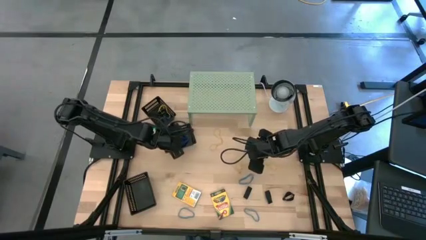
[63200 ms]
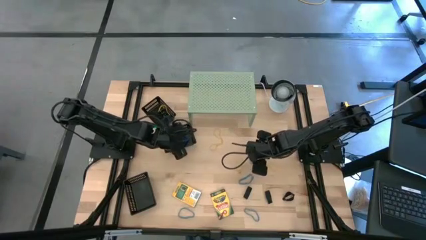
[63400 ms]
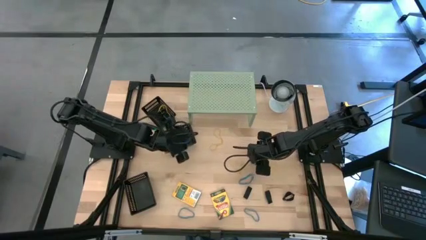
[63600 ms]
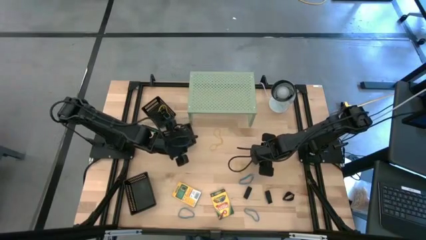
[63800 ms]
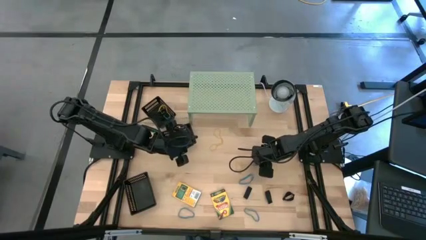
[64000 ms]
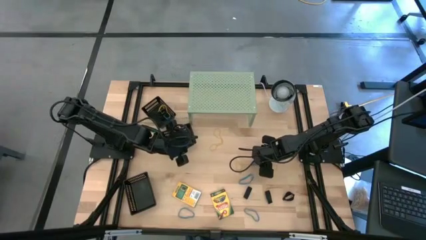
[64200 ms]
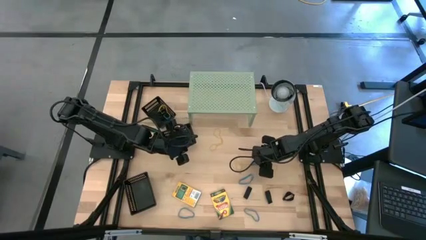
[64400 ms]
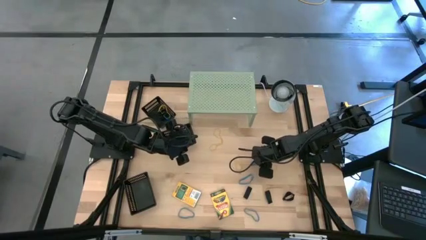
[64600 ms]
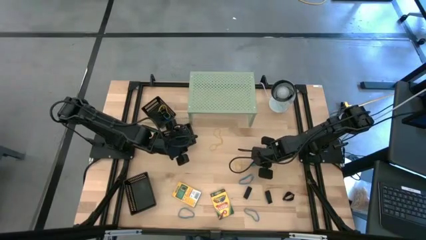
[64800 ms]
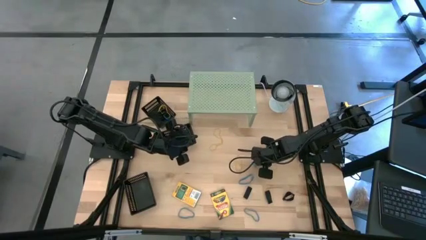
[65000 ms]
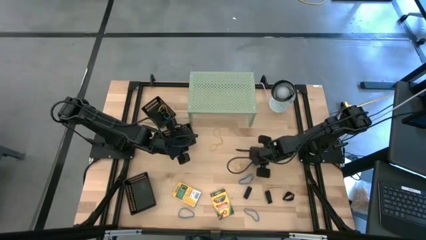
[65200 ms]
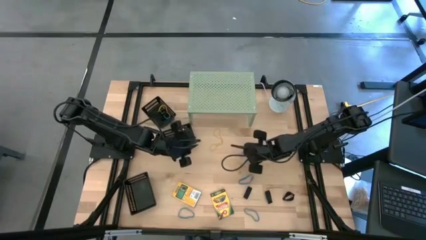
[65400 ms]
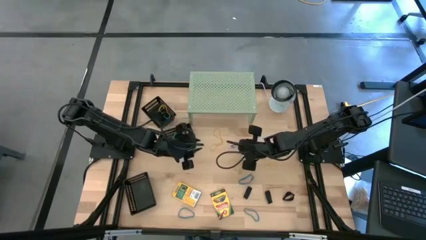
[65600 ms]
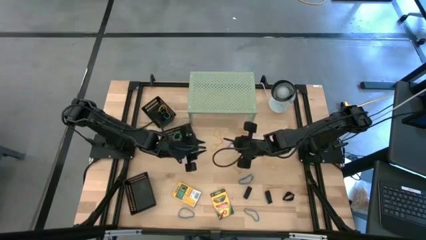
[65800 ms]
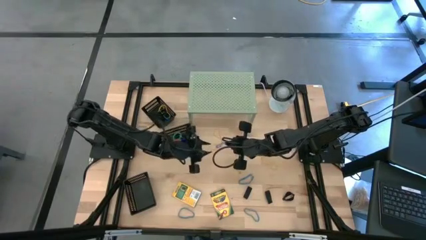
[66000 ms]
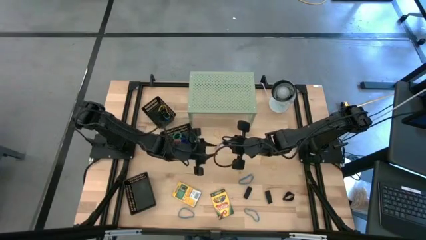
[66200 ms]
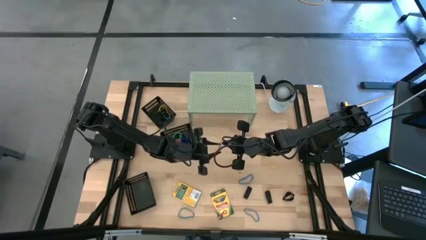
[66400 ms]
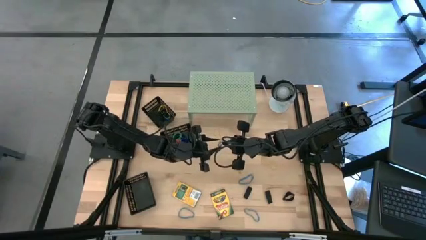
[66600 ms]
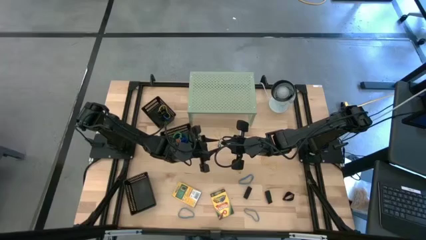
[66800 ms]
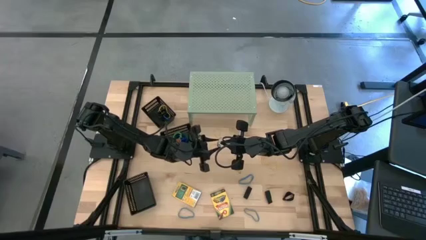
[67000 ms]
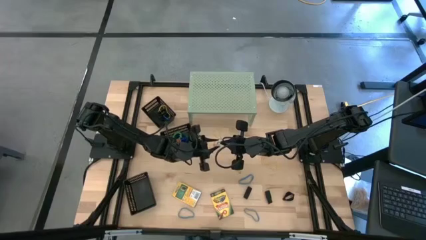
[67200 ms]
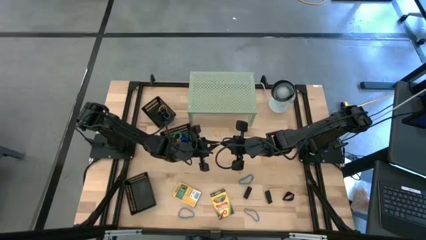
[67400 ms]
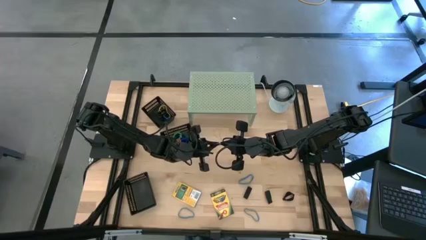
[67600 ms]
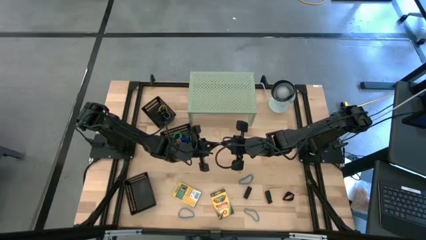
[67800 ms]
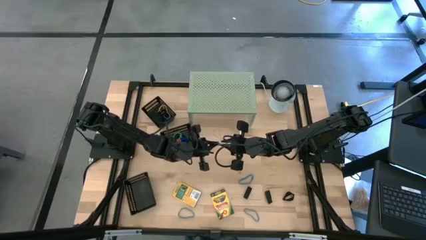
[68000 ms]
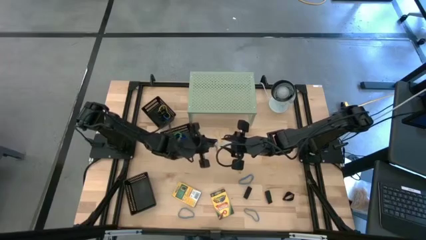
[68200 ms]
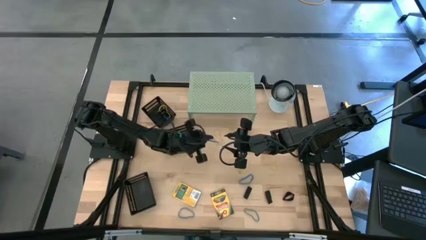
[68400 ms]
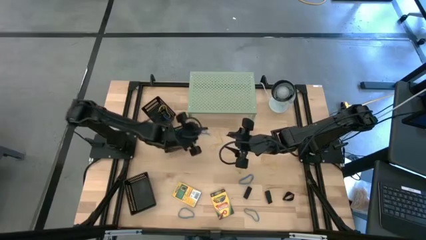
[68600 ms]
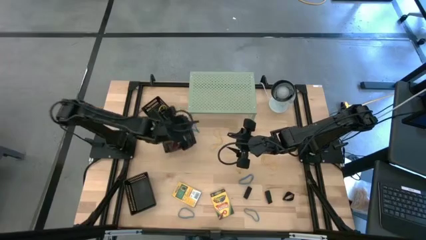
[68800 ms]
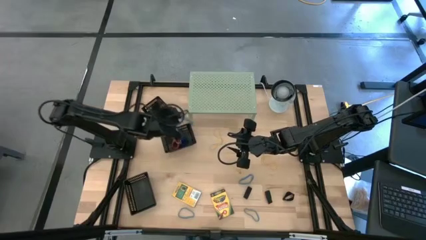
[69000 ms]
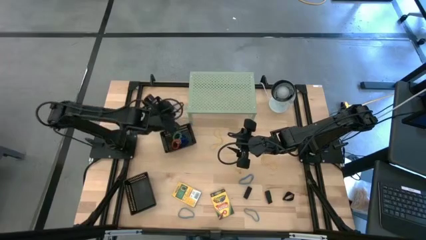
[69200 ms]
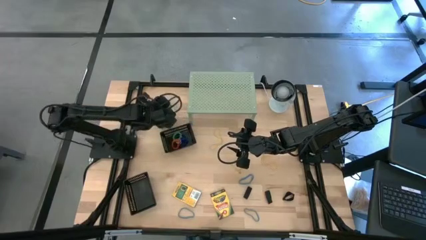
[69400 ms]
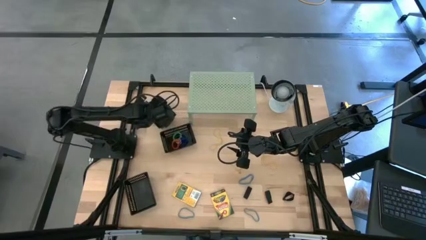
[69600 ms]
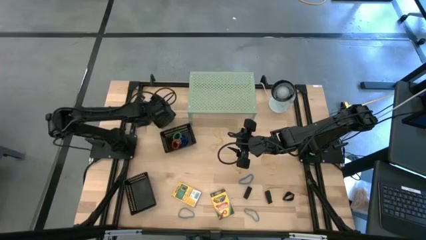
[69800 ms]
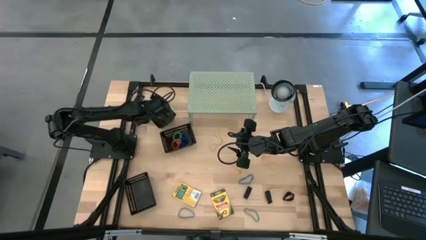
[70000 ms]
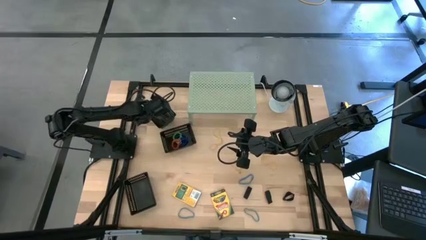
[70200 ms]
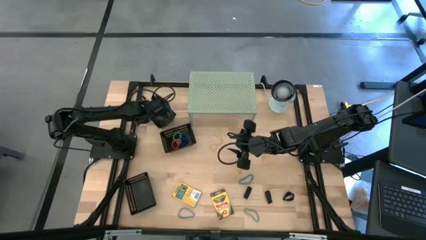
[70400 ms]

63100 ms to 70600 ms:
Task: Pick & Place Office Desk Supplies
Put the blue rubber band into the top black bin

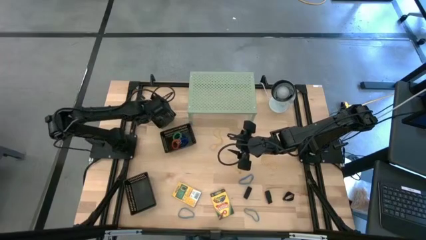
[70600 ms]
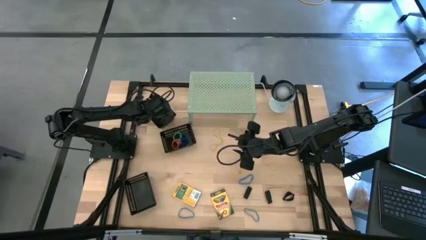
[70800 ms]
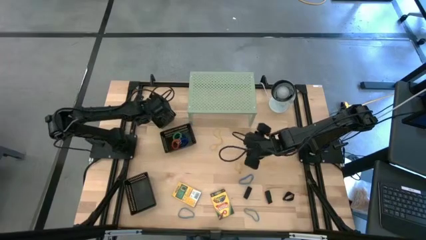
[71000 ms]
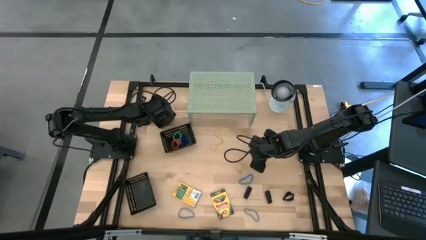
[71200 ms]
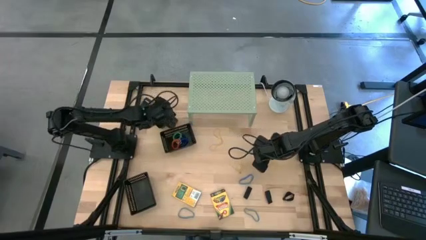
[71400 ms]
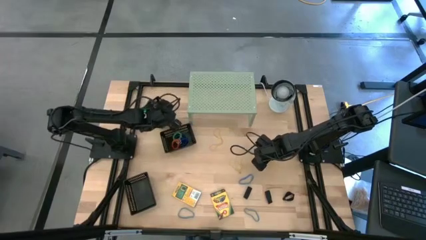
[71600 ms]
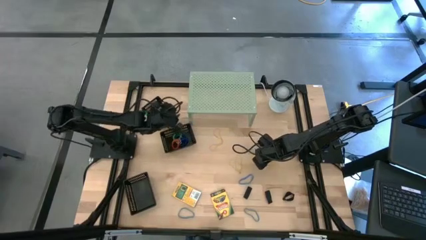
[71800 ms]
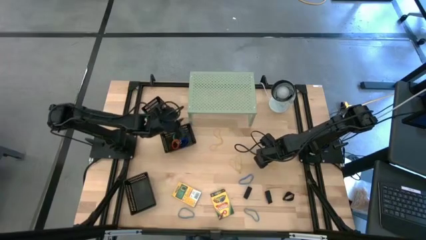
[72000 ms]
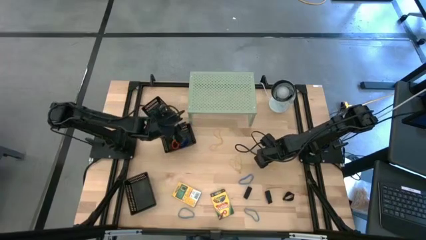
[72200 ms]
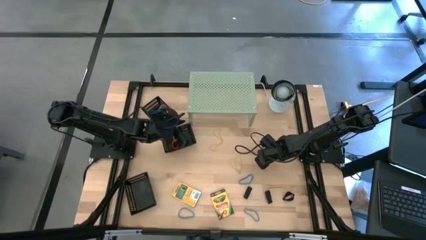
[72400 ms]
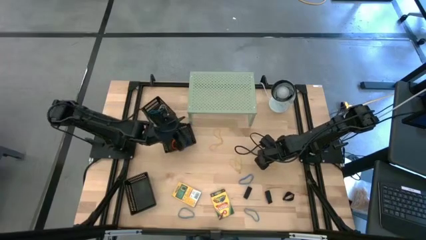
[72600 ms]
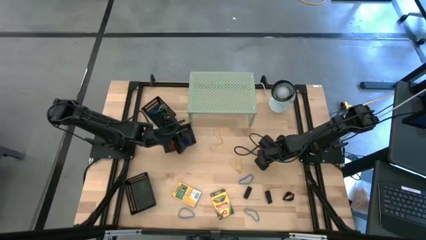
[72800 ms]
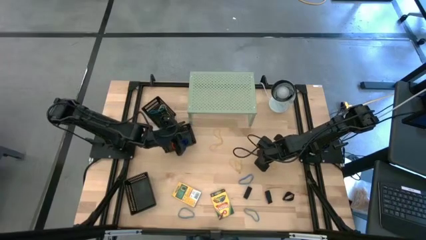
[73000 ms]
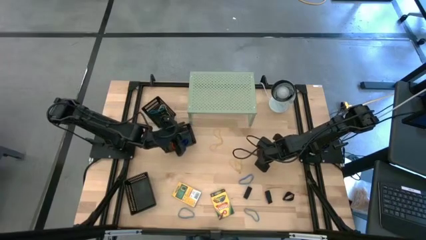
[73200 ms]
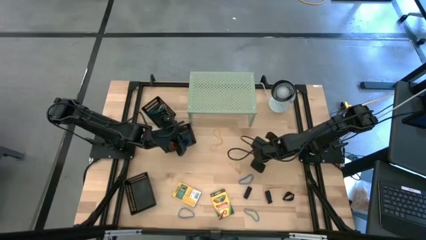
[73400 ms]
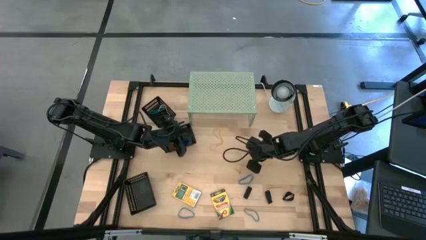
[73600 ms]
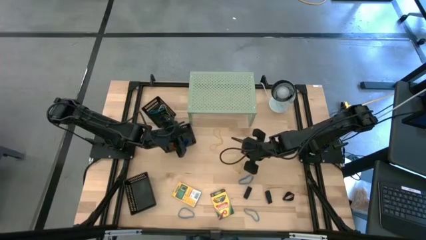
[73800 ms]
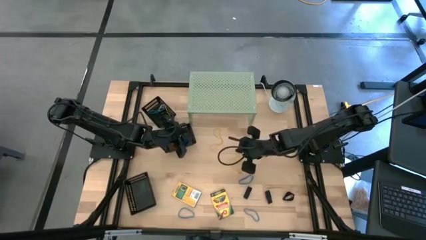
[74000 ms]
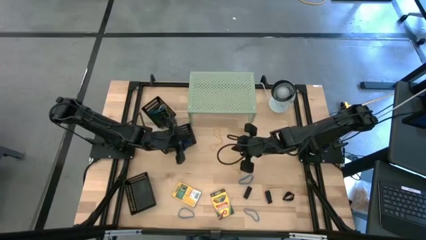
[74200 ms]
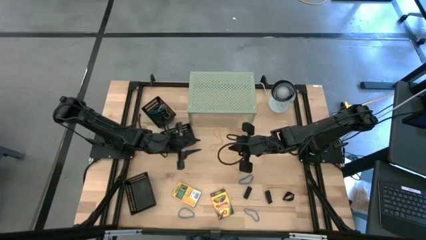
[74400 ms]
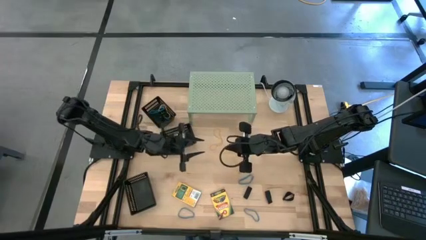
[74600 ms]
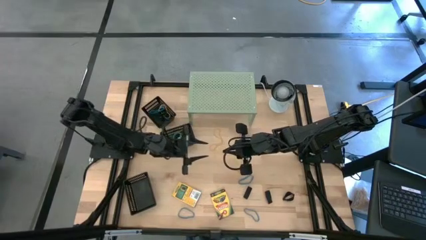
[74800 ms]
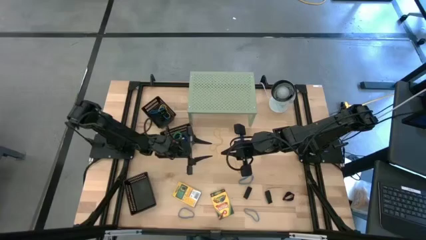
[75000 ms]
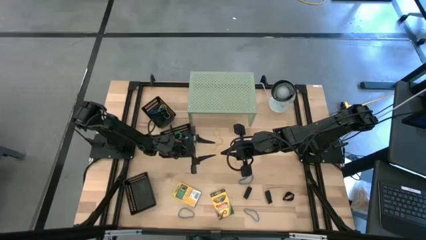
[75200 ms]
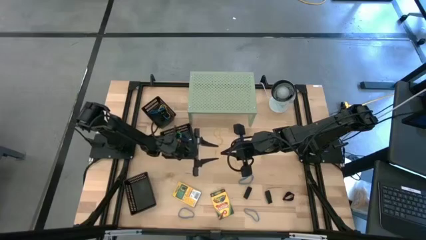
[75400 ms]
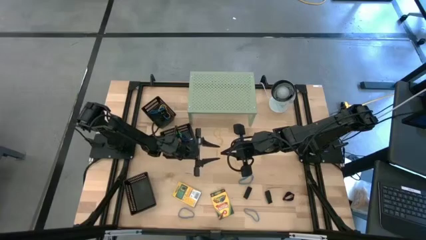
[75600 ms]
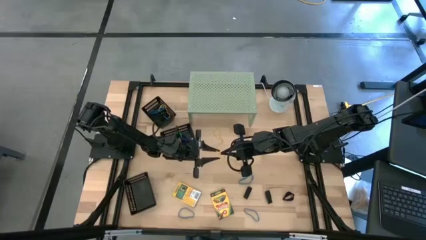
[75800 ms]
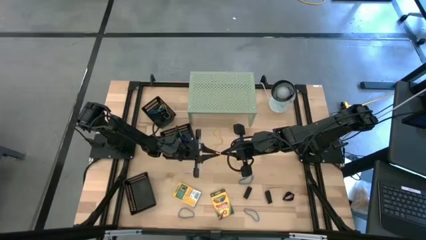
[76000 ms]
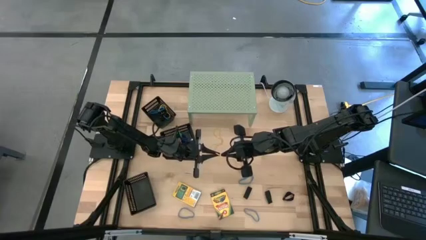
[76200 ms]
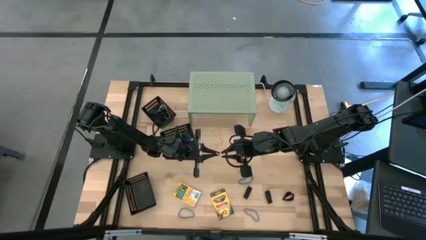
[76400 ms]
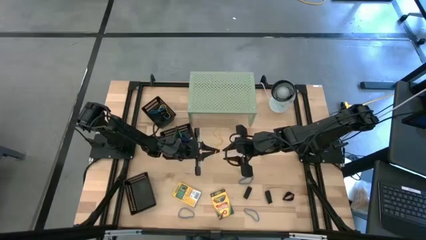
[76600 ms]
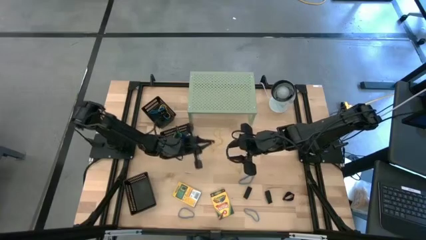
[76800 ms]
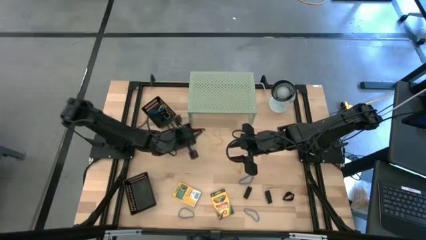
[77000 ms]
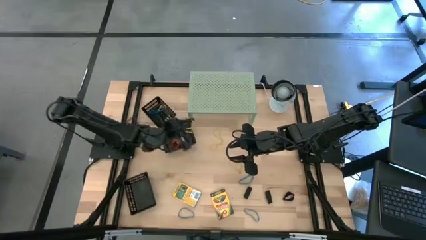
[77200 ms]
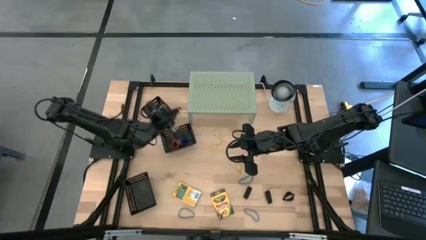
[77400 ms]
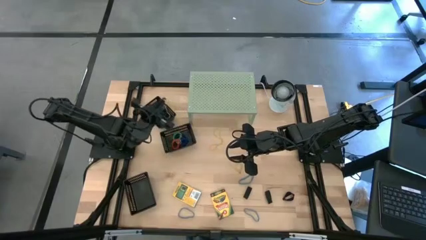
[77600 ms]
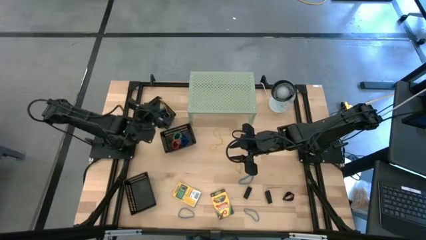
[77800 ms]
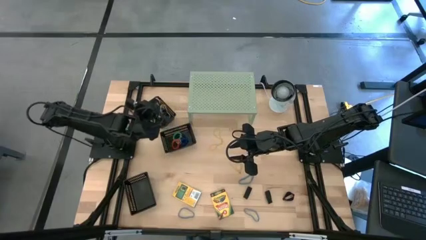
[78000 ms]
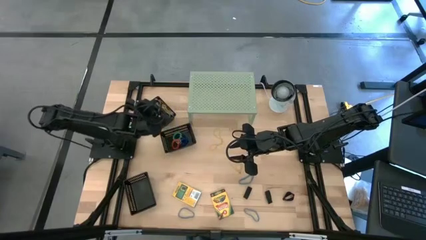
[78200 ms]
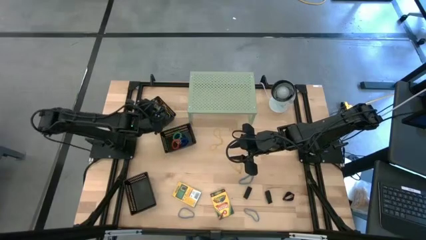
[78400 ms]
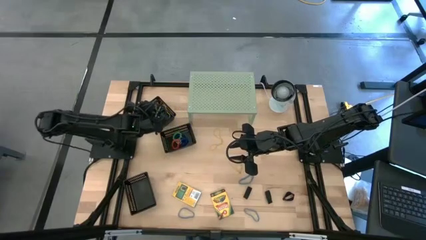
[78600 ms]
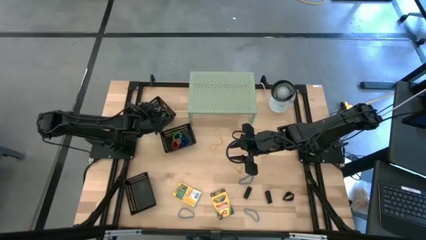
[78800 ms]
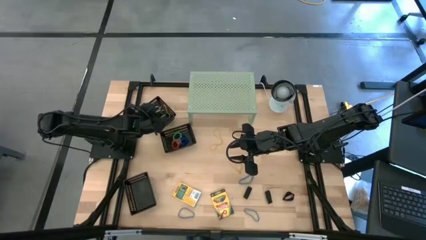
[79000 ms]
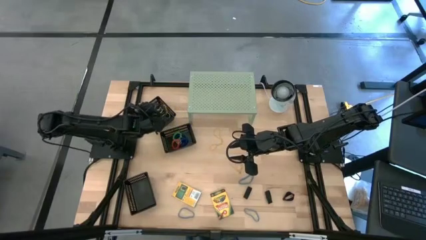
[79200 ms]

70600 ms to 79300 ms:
Put the yellow rubber band into the top black bin
